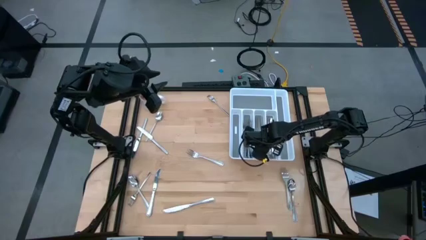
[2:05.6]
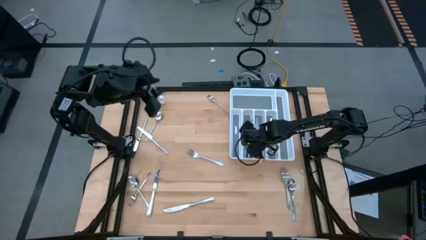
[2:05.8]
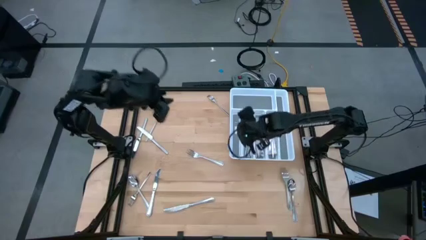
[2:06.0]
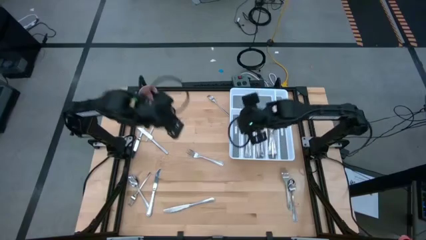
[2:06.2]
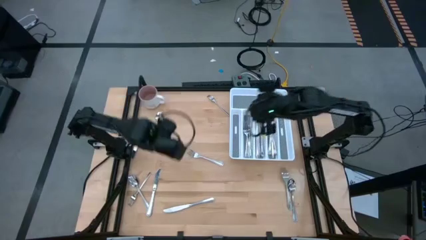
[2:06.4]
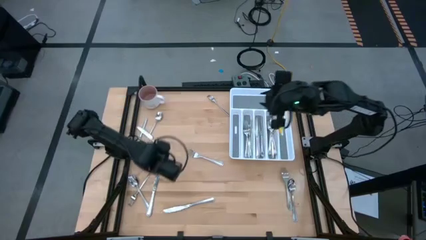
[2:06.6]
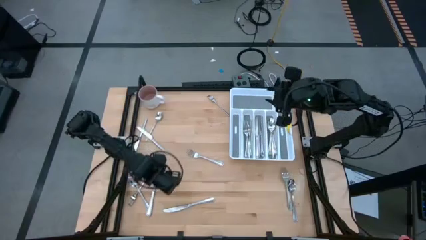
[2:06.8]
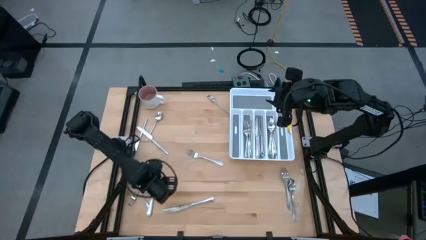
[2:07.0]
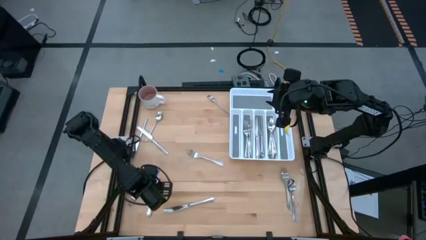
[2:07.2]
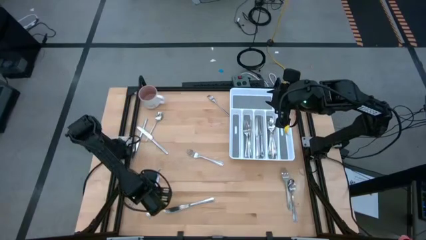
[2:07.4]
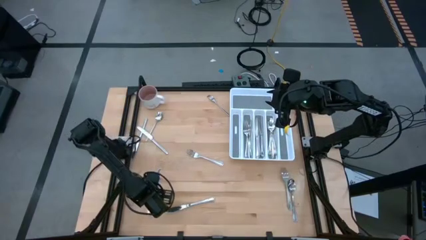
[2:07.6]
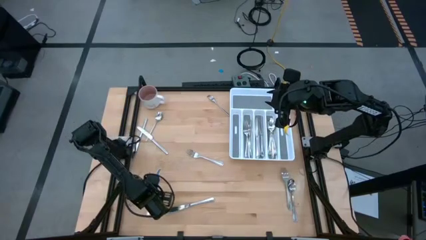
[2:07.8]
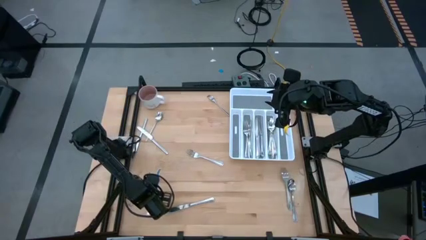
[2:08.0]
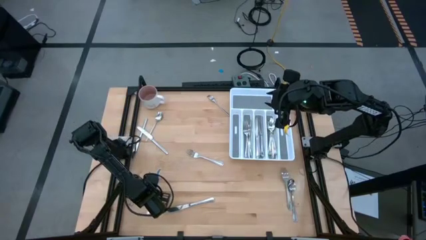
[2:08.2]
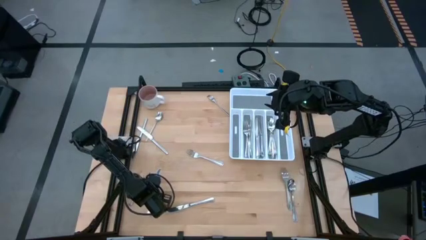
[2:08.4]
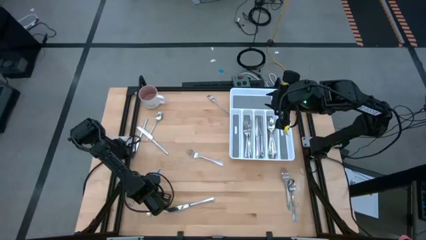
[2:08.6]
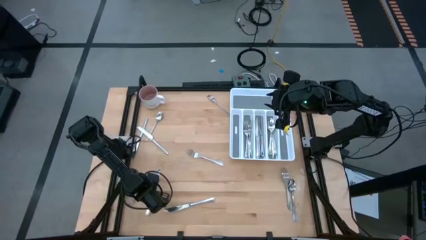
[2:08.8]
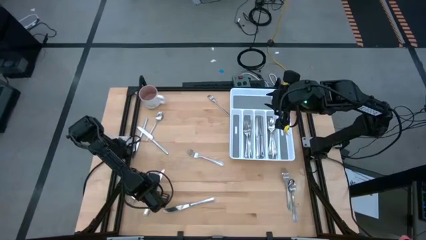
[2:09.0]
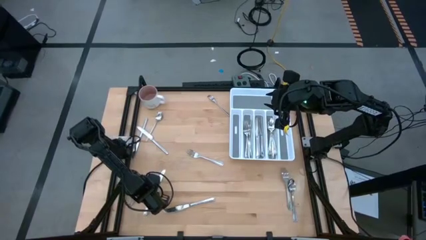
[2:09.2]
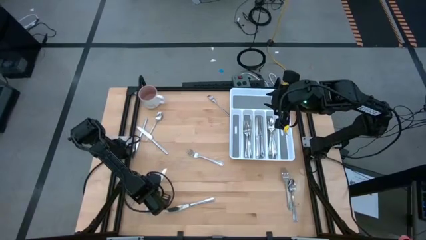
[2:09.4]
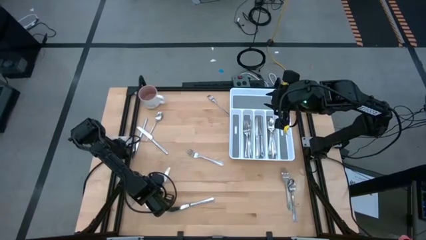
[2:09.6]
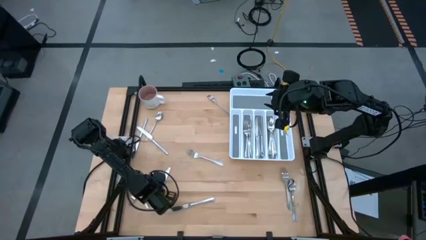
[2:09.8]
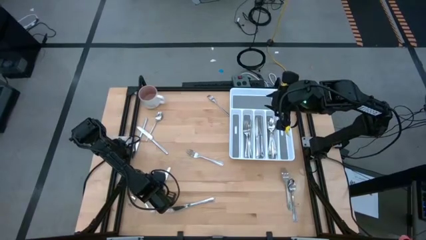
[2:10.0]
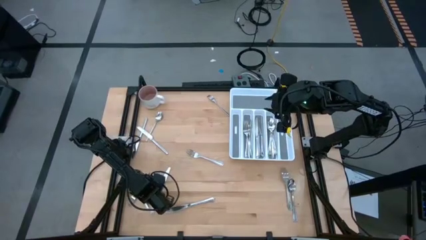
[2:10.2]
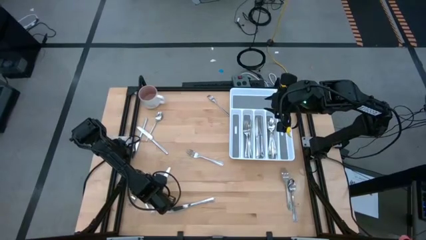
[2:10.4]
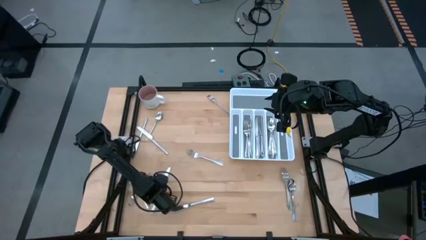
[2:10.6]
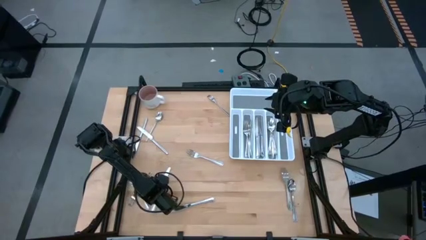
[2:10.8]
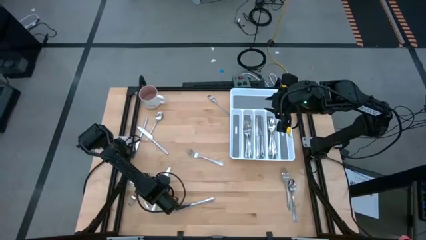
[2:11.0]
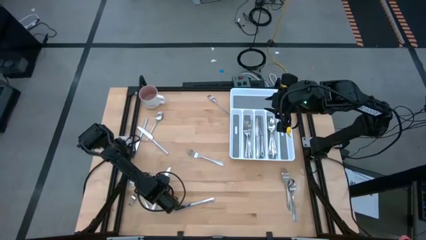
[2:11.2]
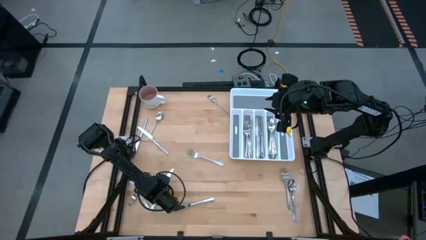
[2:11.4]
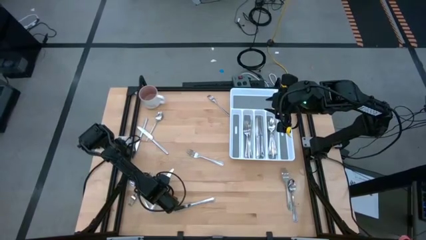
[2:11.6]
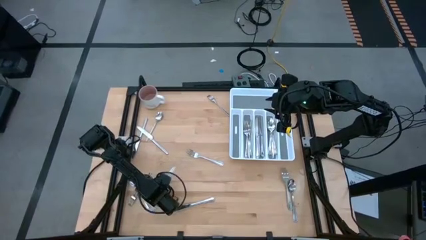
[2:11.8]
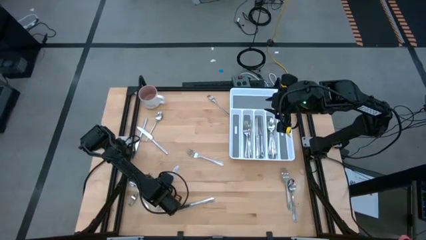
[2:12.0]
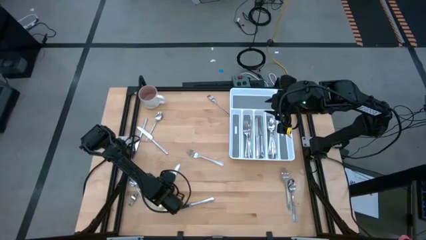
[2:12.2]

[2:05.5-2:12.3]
Task: Sort silverware
Put the silver spoon into the silverware tray

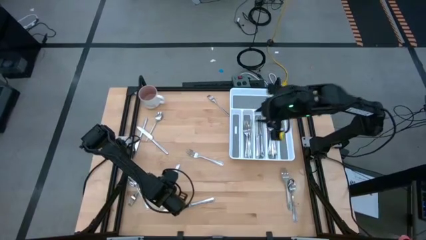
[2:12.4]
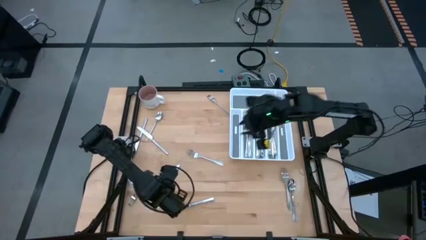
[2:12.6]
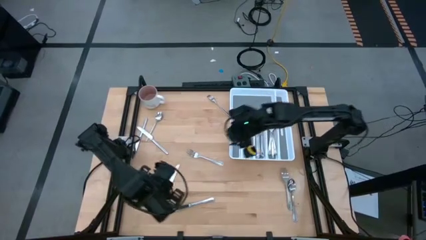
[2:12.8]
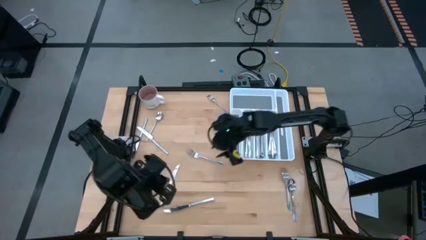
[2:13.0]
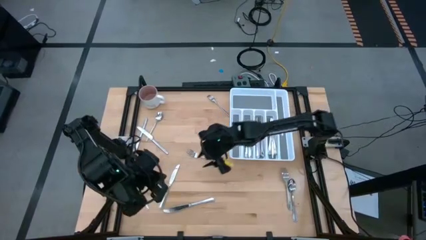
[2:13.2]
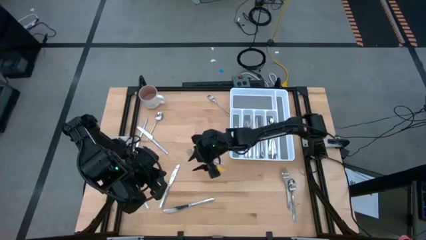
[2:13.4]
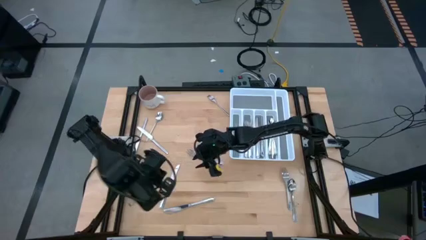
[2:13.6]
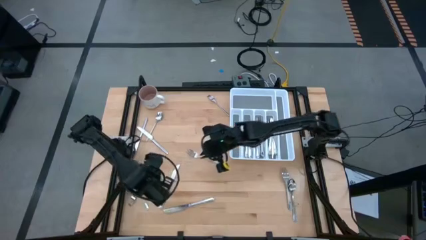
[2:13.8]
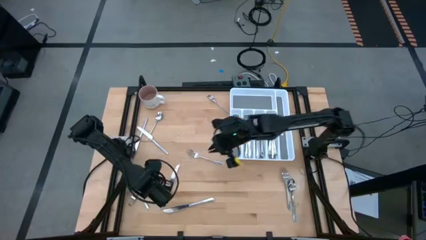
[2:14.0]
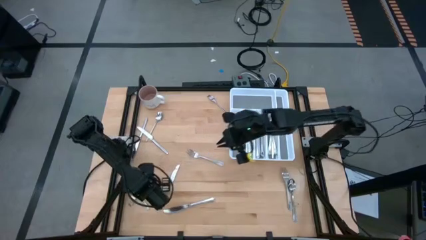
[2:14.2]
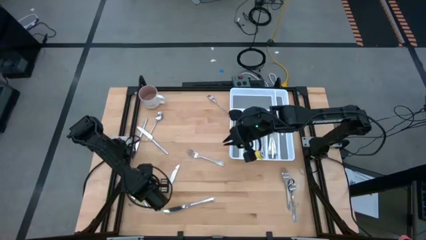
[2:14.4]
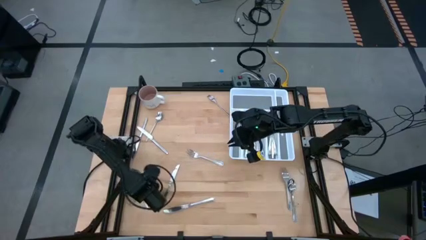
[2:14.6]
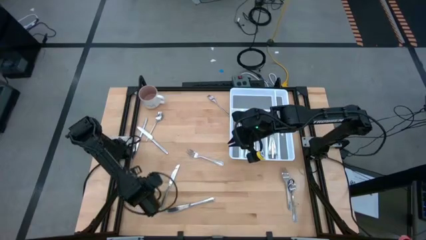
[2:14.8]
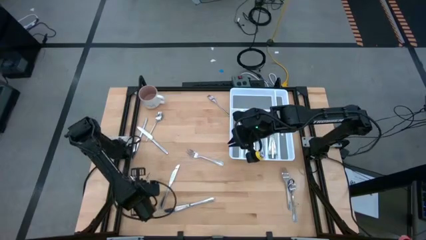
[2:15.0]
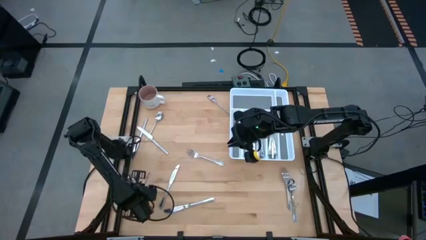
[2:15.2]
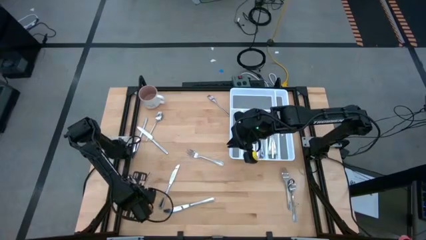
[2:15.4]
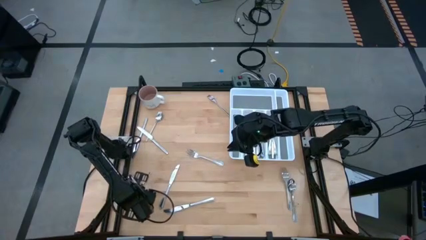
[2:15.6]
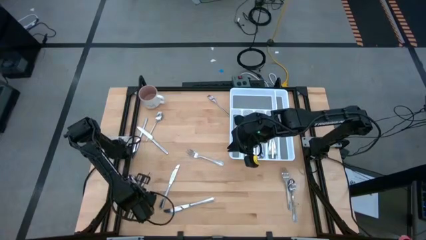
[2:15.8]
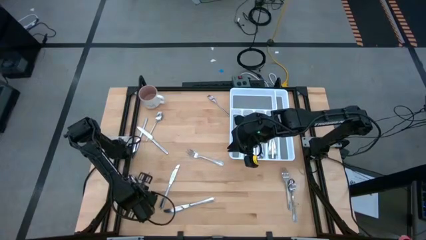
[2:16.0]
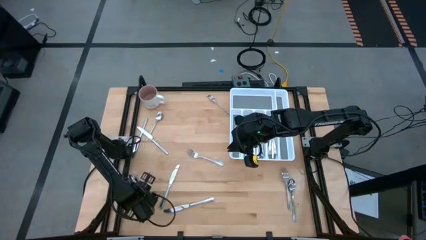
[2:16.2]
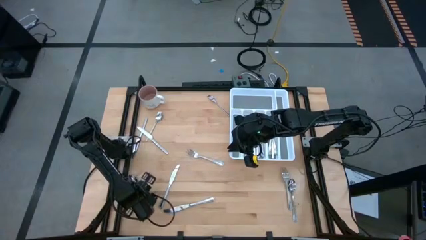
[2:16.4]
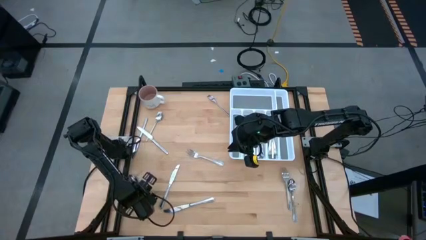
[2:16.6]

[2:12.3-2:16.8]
Put the silver spoon into the silverware tray

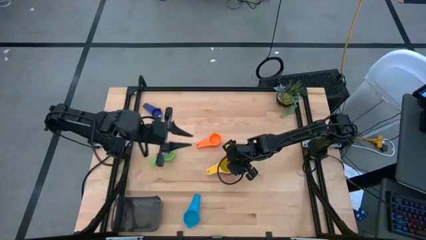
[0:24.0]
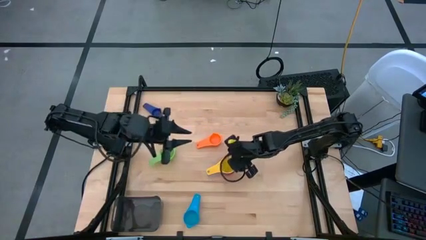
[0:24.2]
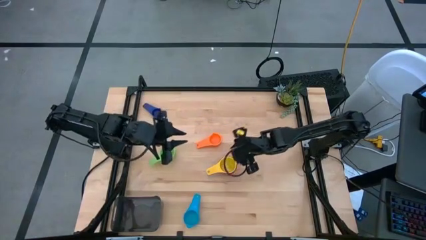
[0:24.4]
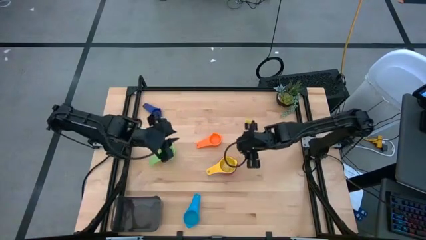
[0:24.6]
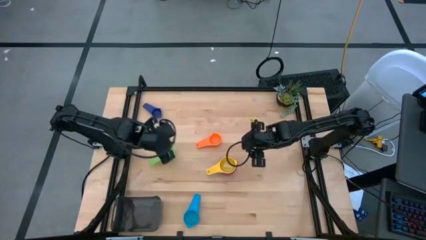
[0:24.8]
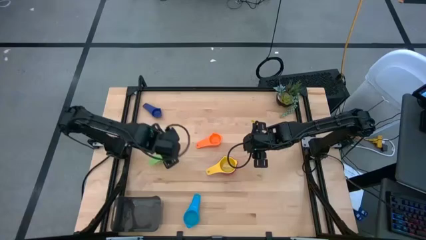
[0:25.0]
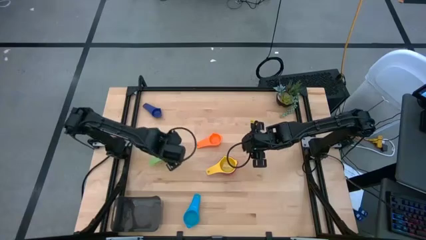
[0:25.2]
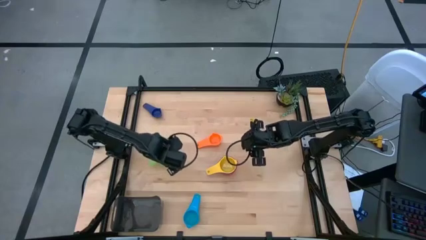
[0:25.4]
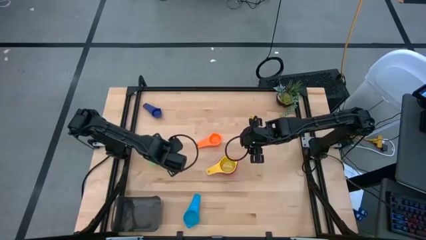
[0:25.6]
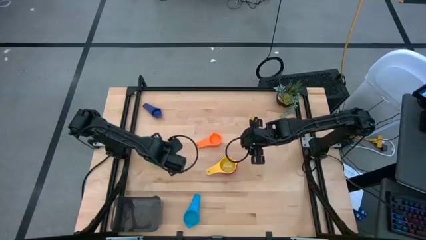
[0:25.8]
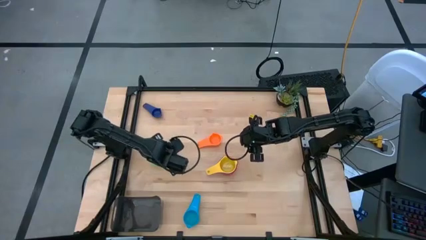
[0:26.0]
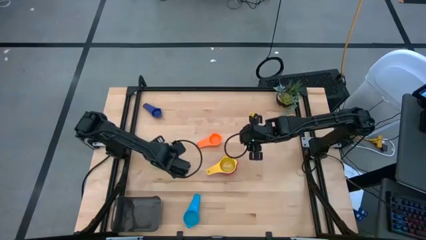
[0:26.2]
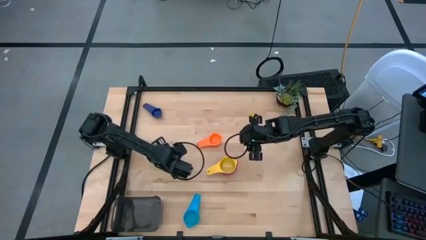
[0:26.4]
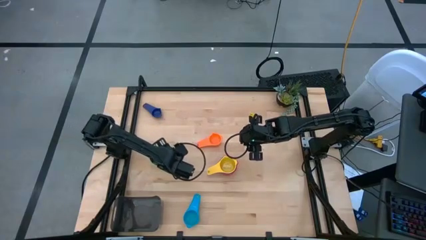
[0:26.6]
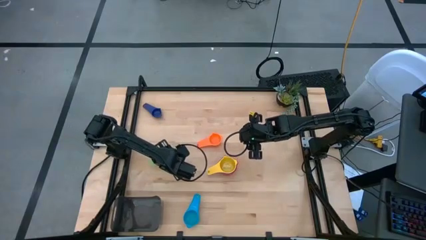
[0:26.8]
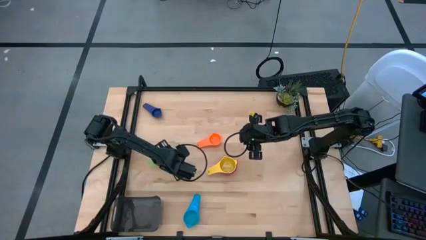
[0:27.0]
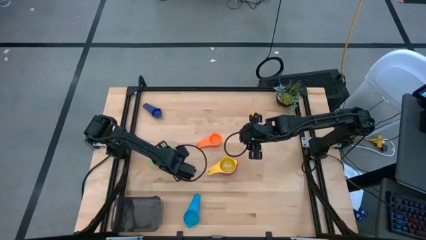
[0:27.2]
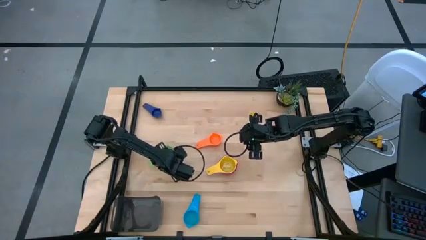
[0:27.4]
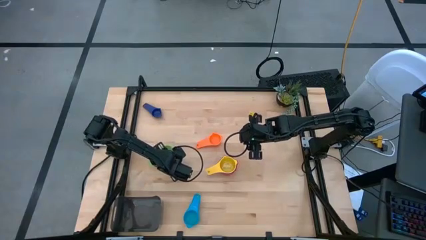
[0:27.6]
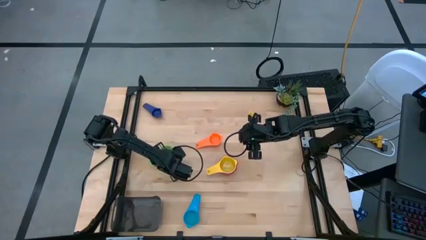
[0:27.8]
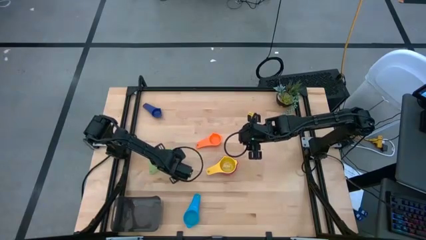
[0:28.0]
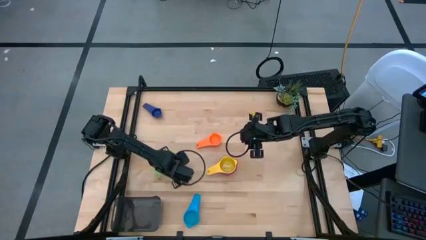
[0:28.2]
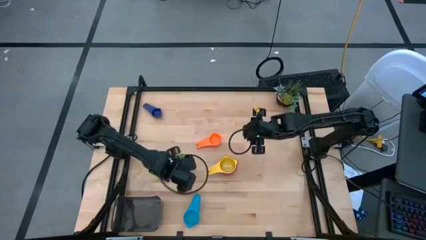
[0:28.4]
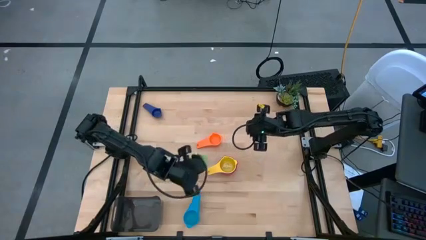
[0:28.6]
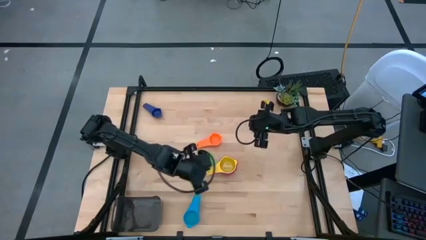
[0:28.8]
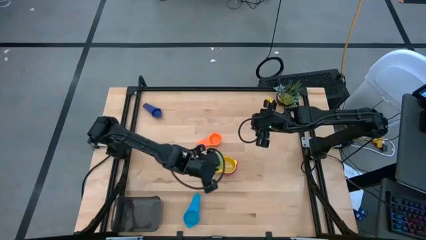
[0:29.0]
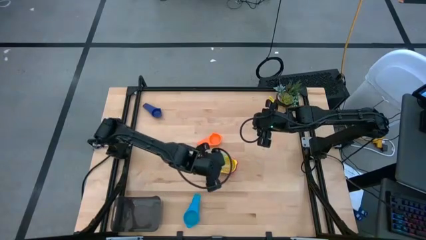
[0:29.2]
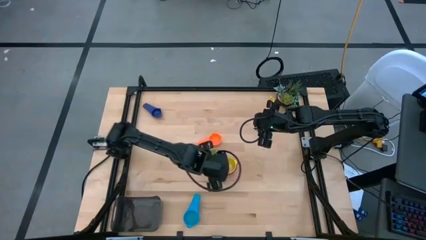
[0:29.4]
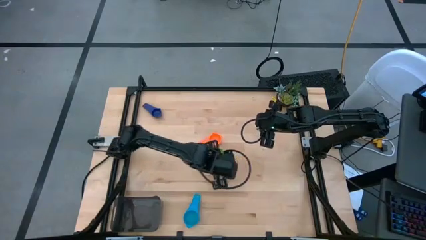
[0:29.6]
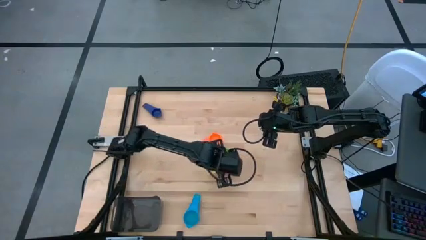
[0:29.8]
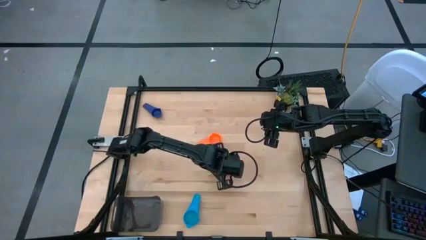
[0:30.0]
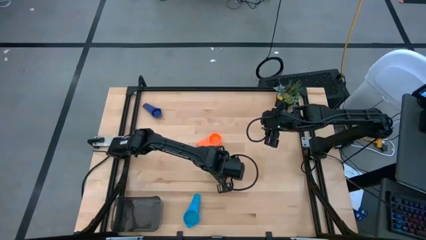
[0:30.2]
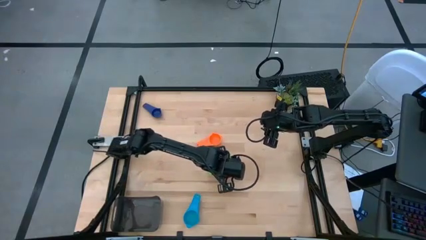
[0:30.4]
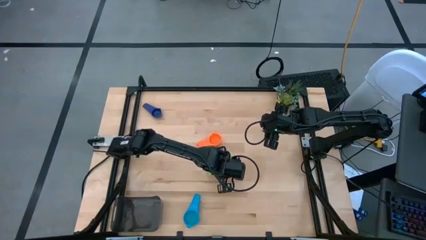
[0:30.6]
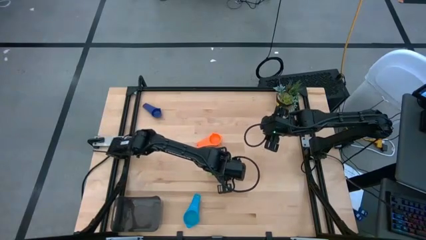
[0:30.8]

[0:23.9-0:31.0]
Task: Nest measuring cups in basket
Stack the green measuring cup on top of the yellow measuring cup
